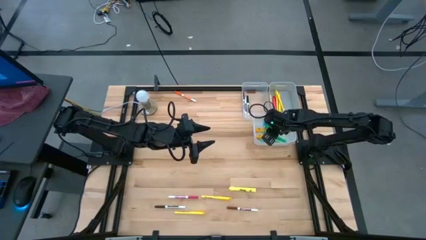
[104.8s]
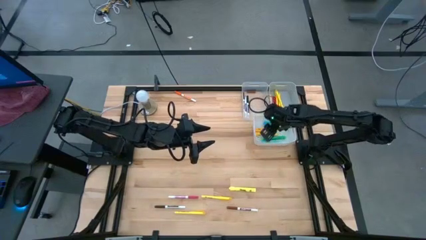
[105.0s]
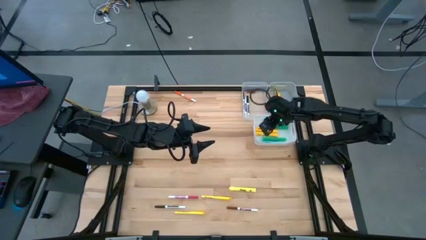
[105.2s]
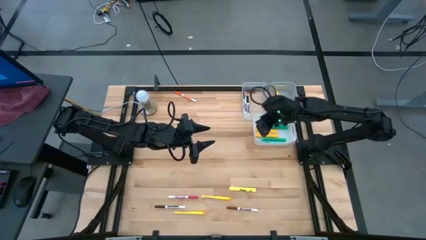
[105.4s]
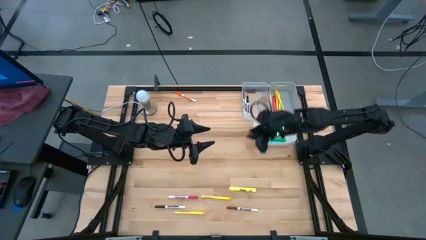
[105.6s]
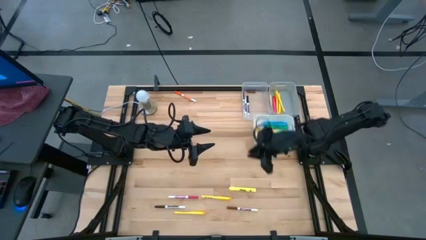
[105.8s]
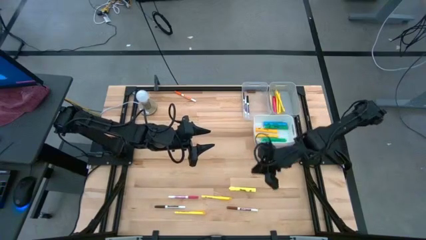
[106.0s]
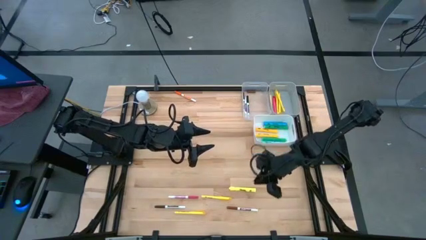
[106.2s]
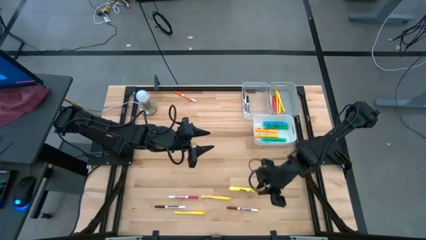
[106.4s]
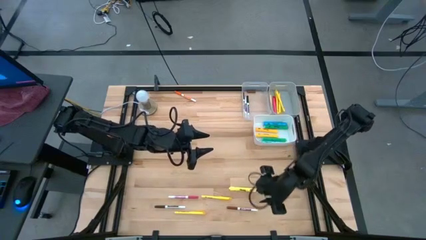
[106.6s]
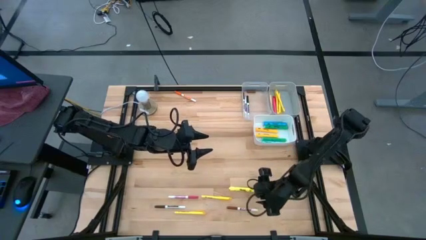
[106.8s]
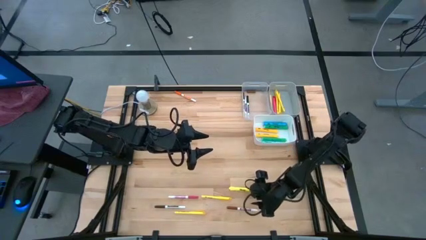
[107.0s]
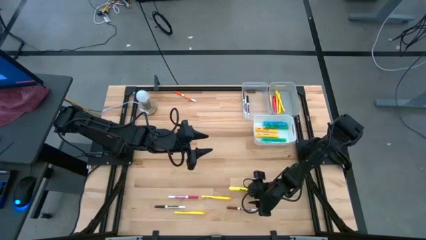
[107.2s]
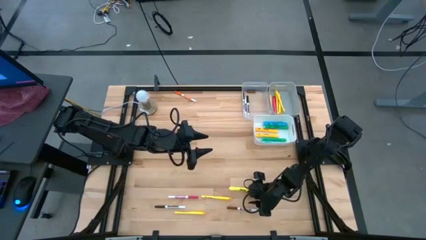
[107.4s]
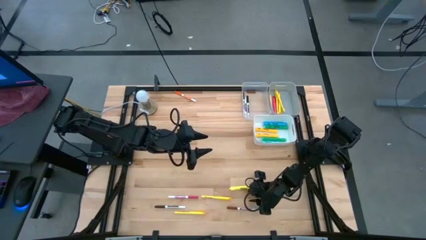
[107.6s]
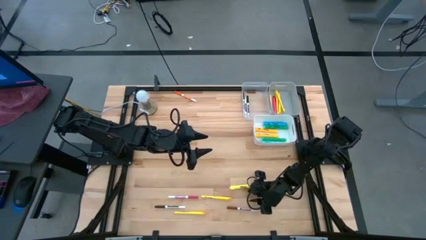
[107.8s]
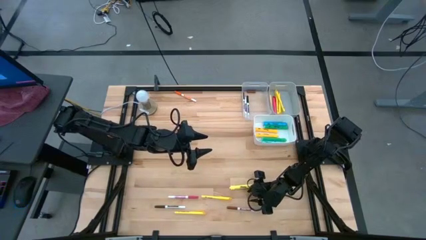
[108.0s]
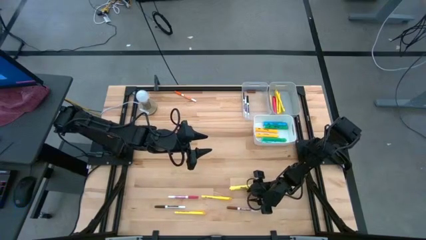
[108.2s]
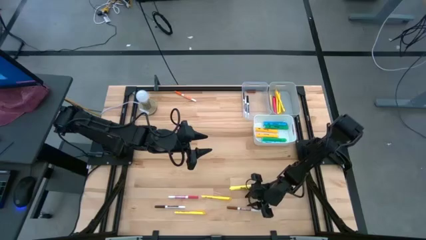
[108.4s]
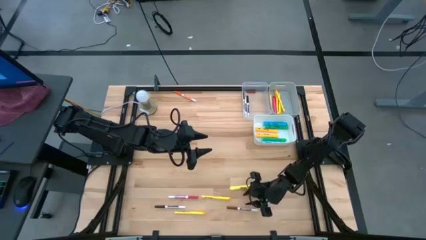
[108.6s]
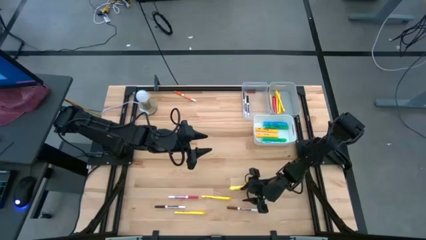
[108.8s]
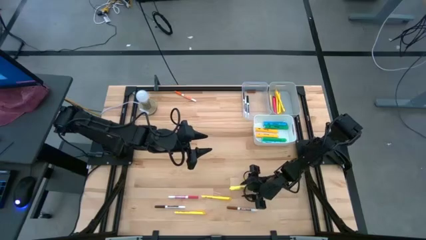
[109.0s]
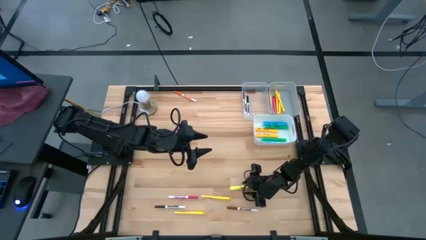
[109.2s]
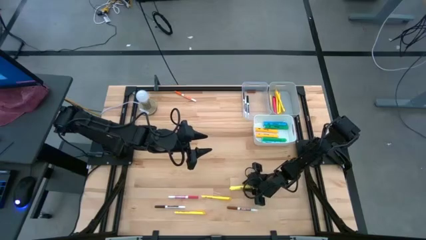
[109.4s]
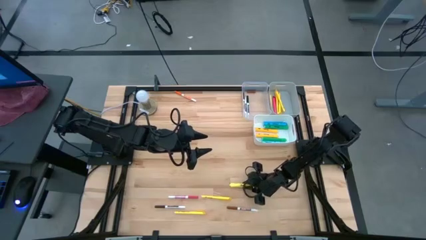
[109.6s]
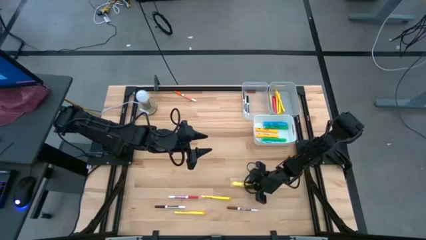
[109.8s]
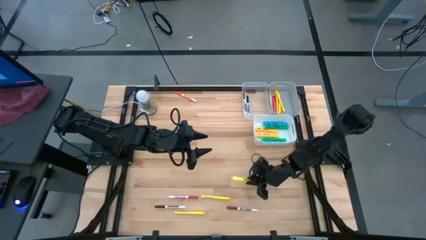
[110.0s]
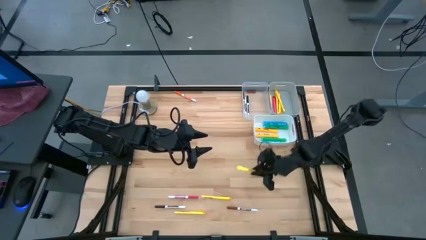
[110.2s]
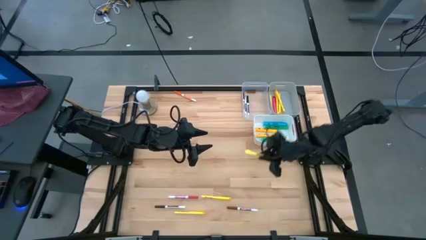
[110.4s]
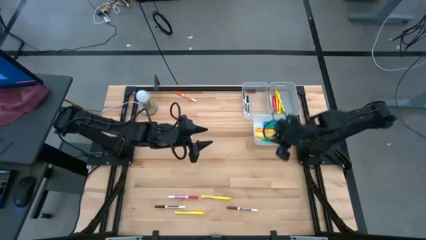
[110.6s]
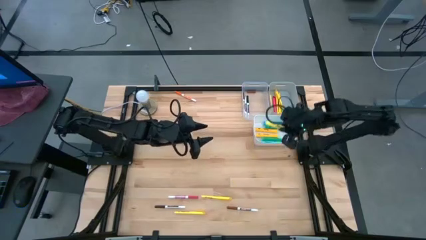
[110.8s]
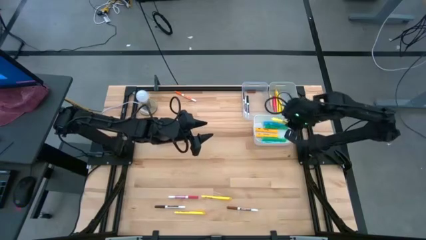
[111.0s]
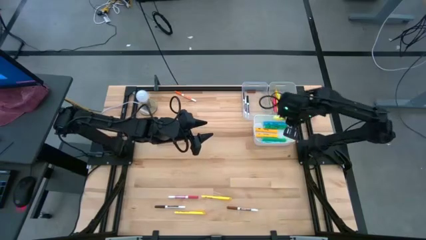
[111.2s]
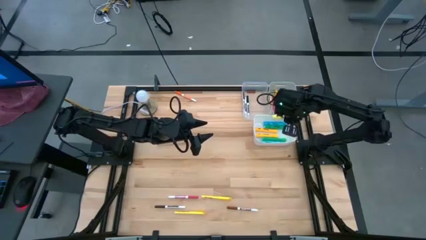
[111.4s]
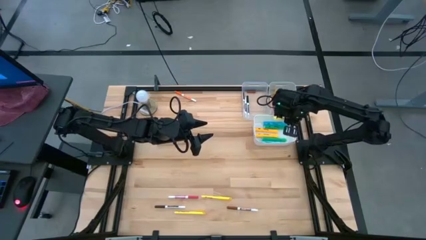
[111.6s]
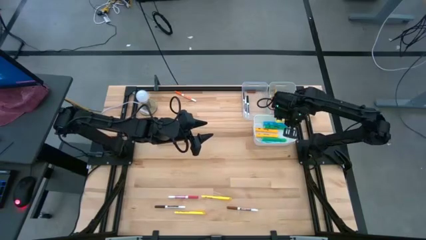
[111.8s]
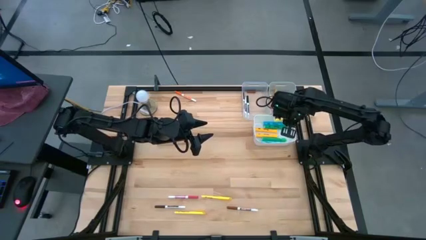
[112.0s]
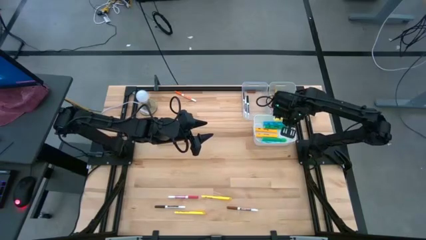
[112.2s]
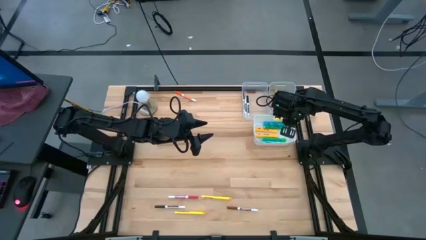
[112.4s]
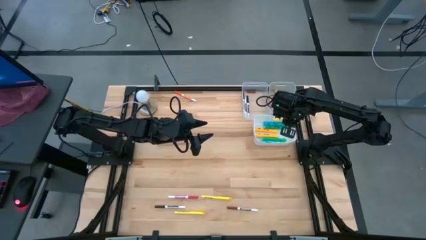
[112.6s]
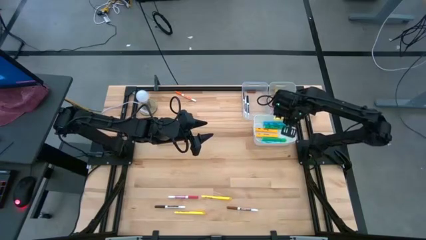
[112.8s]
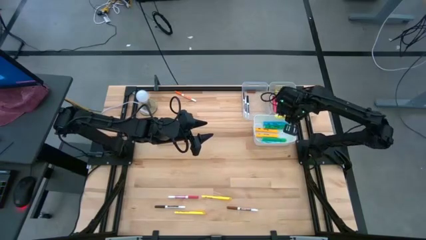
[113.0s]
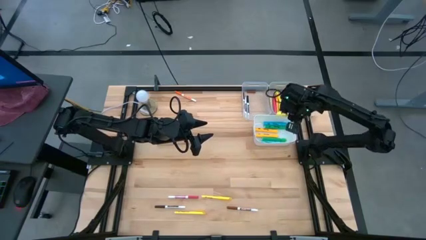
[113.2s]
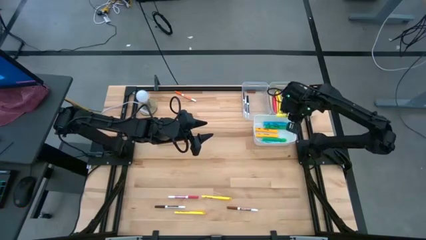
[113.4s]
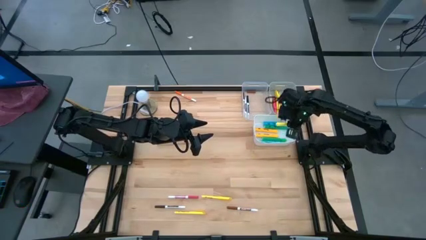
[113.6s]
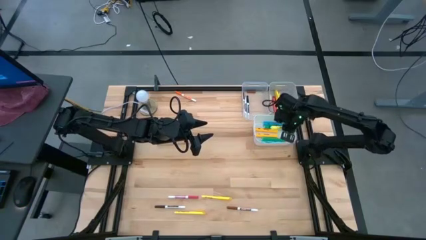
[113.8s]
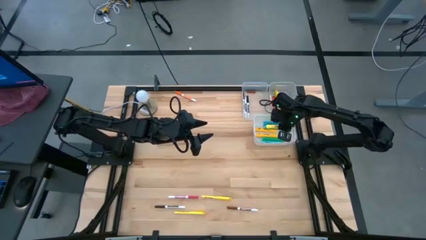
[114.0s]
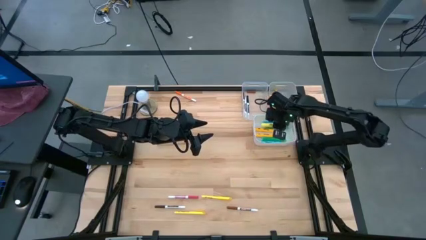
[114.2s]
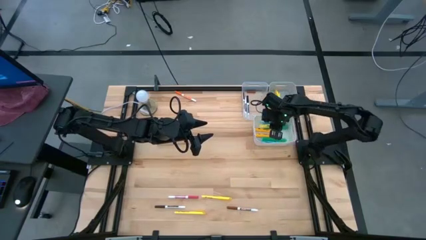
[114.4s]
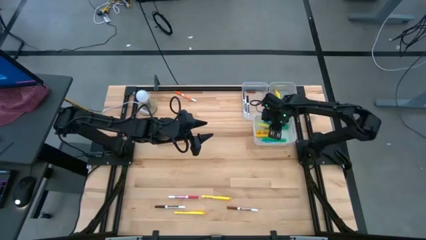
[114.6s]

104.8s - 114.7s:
Task: Pick & Place Markers
Put the yellow highlighter pen into the white bin

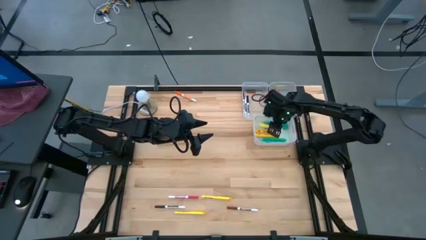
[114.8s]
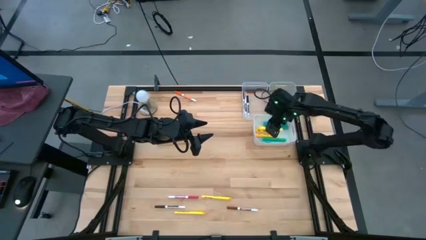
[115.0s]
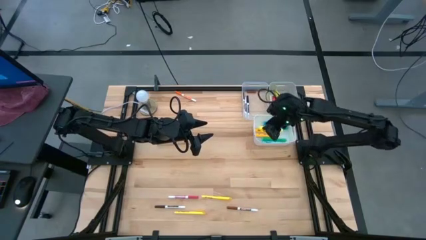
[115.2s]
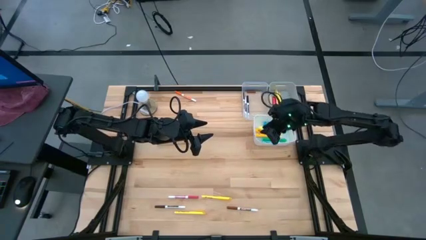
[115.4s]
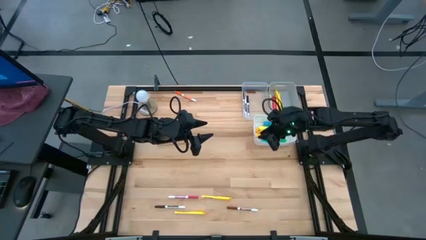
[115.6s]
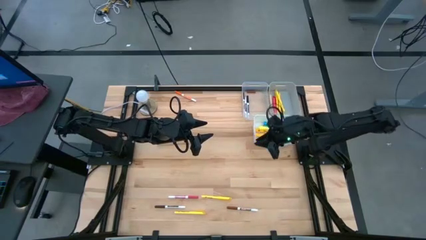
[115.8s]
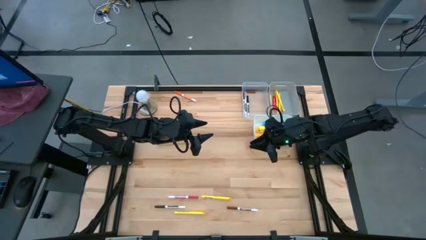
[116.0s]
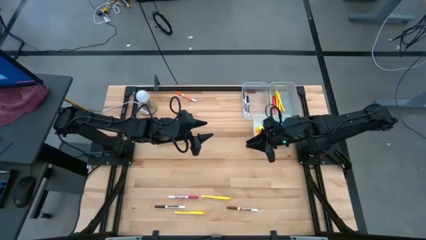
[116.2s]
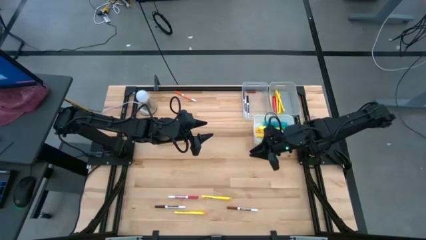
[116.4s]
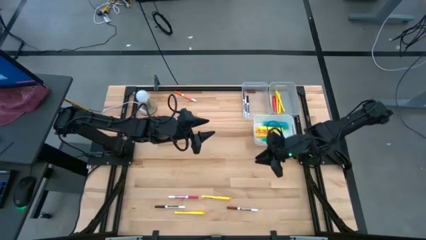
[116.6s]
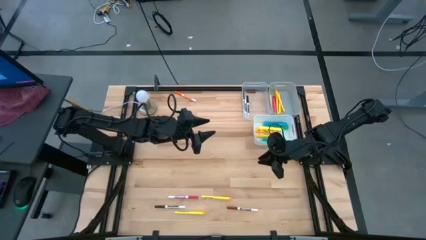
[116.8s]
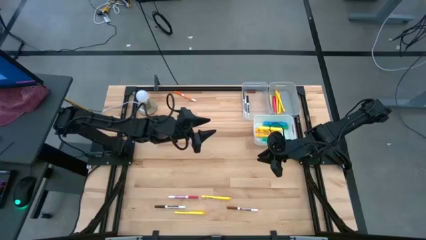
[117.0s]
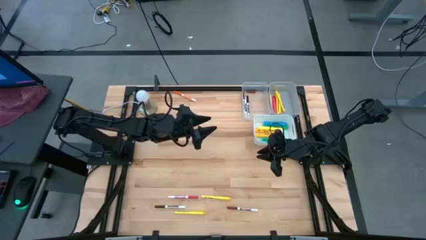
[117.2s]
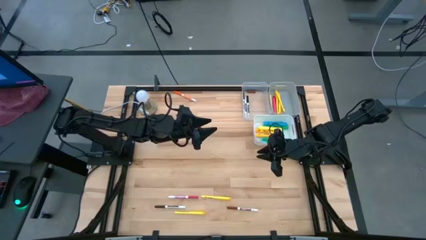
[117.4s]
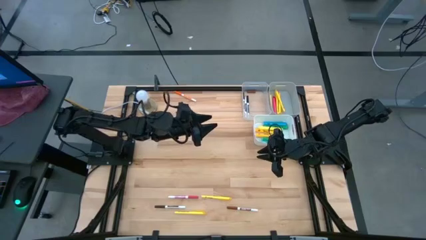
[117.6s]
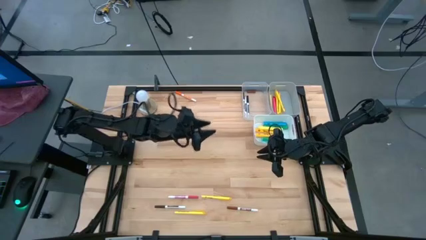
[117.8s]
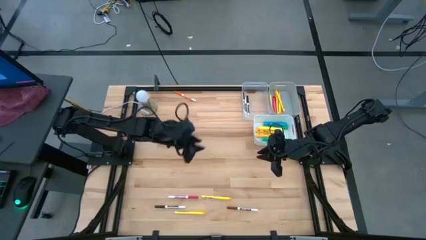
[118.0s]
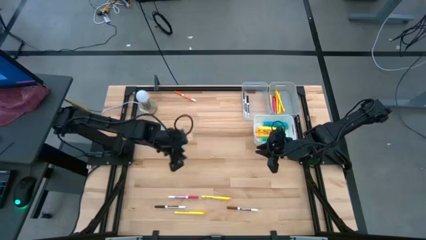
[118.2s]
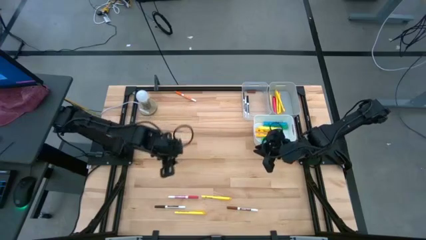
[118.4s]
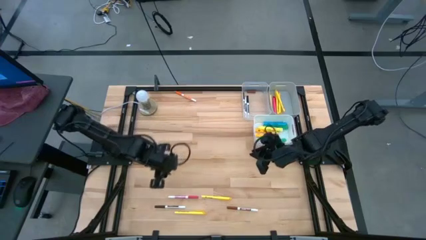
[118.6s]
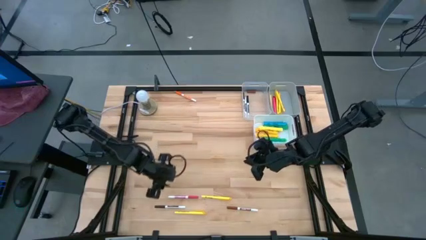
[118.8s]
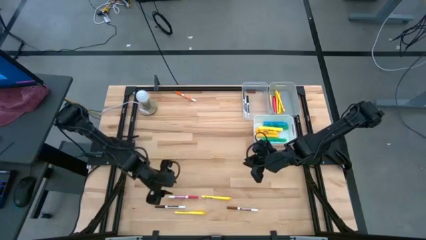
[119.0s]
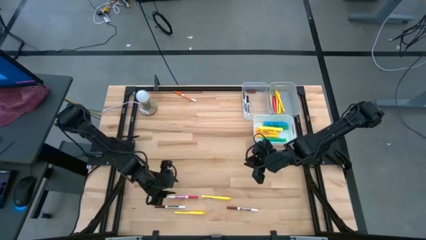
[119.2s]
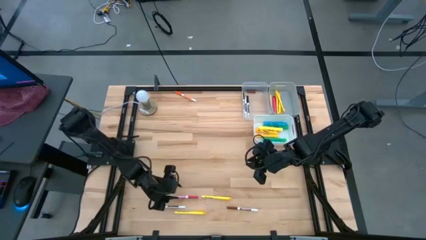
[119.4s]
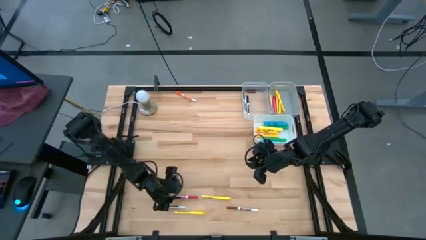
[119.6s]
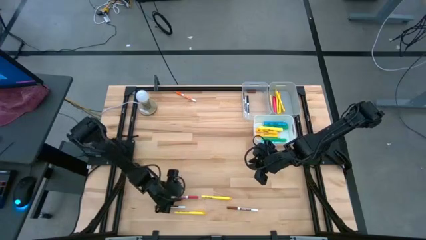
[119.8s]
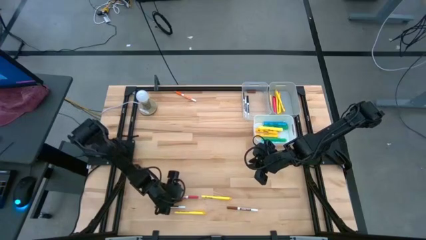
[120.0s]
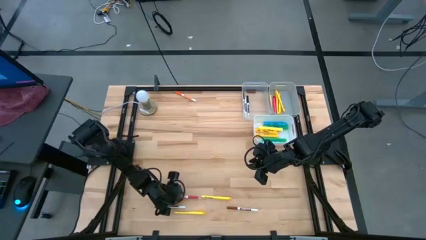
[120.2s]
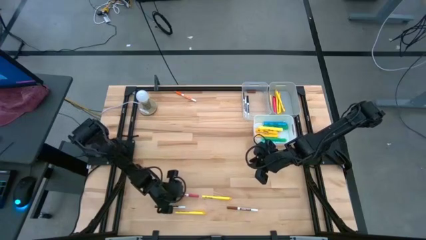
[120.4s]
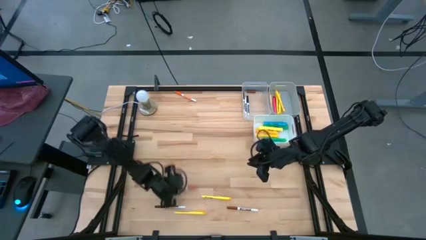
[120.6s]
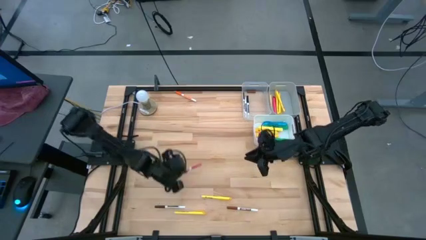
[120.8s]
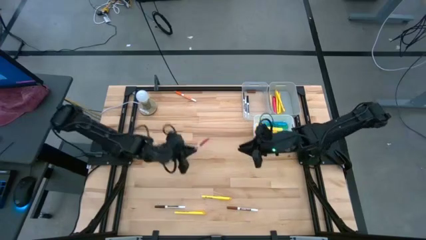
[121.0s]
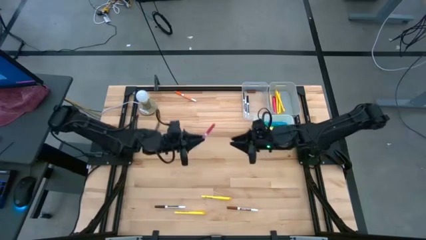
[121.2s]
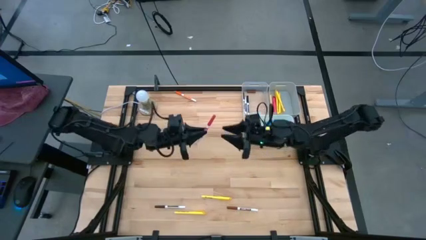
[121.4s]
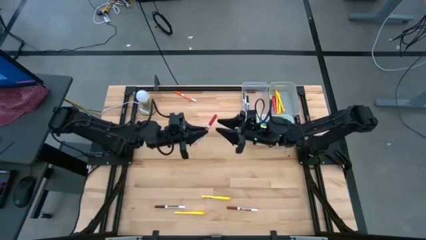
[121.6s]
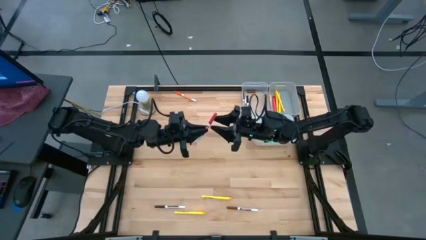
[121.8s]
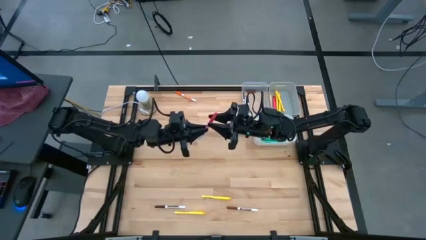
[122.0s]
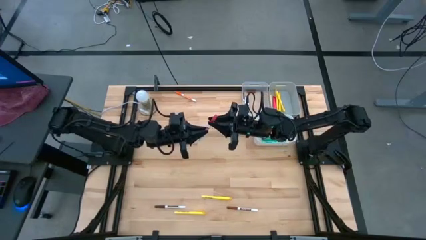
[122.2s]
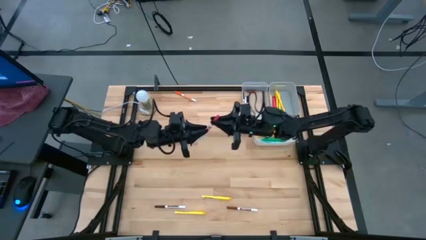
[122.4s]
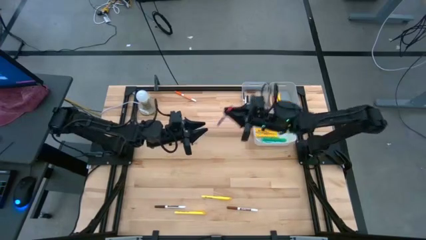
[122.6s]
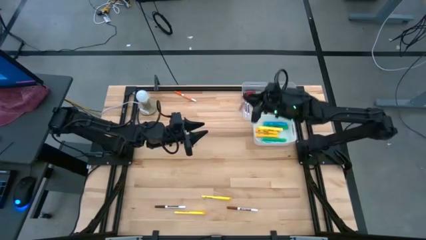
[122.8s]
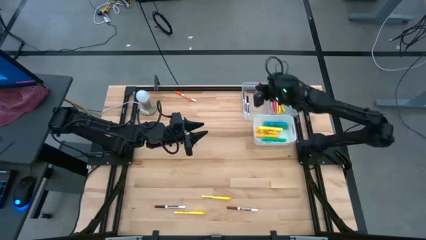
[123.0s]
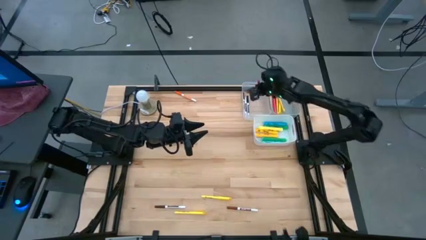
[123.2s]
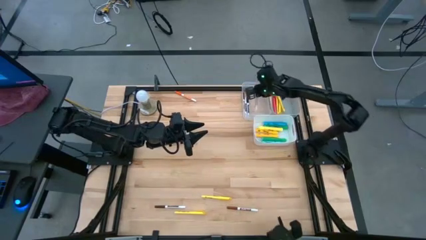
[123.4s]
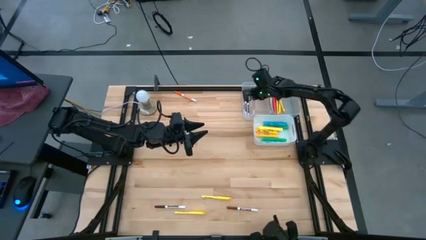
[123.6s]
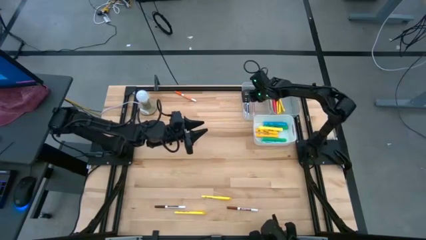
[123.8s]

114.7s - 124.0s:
Put the pink marker pen into the transparent bin
